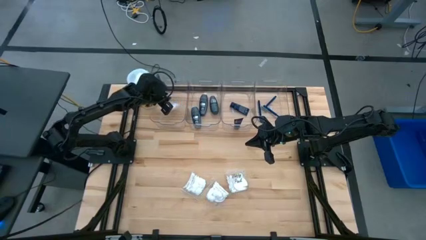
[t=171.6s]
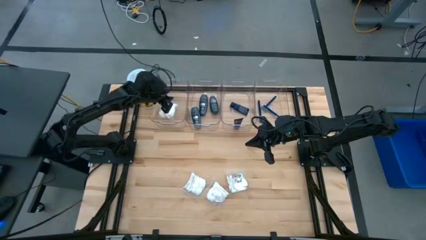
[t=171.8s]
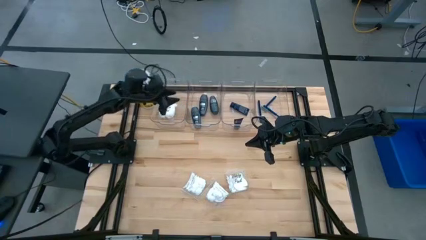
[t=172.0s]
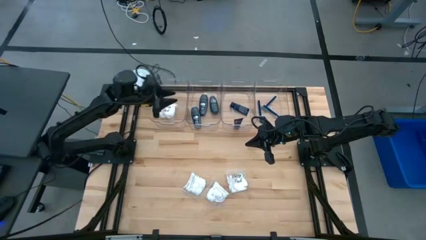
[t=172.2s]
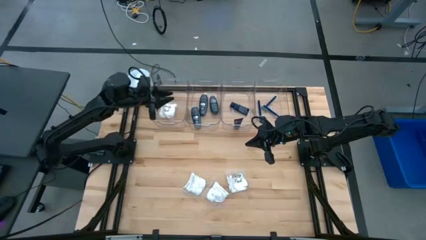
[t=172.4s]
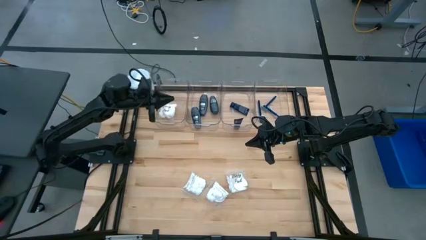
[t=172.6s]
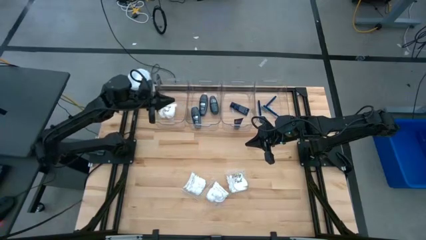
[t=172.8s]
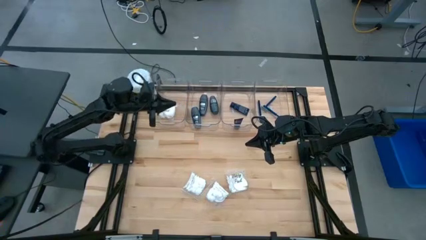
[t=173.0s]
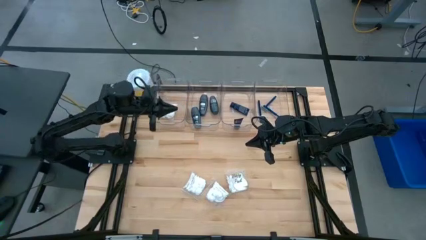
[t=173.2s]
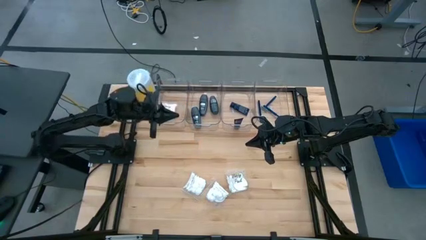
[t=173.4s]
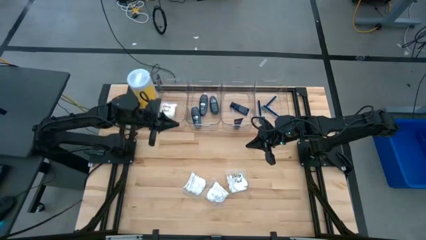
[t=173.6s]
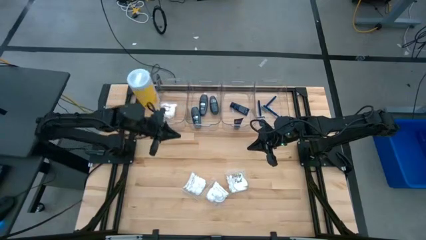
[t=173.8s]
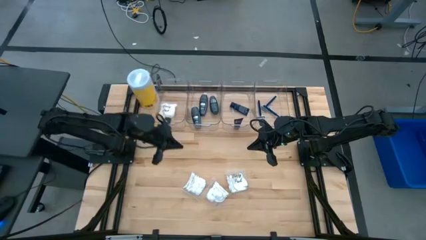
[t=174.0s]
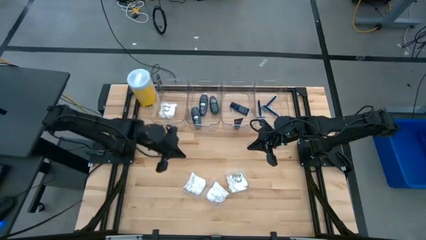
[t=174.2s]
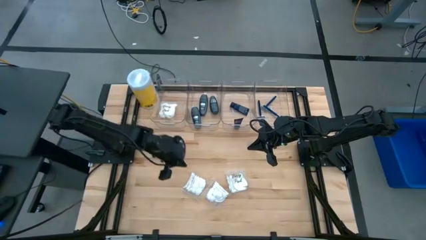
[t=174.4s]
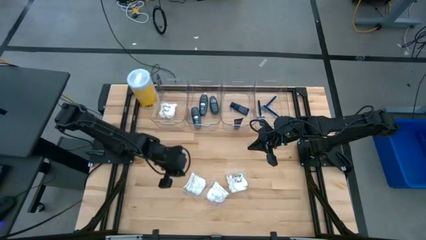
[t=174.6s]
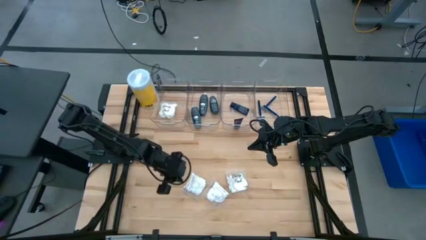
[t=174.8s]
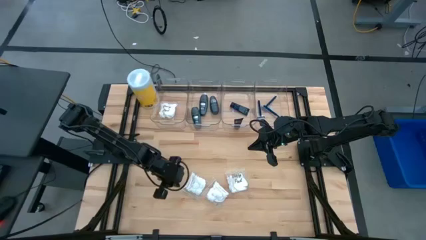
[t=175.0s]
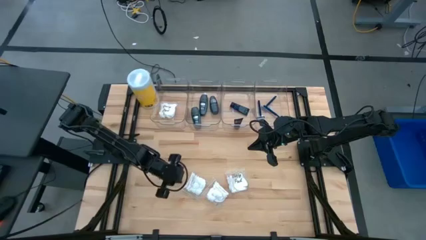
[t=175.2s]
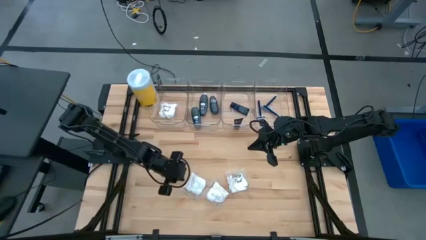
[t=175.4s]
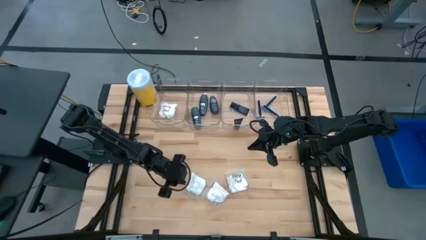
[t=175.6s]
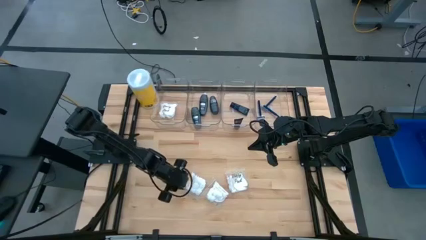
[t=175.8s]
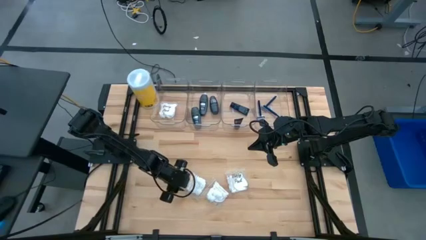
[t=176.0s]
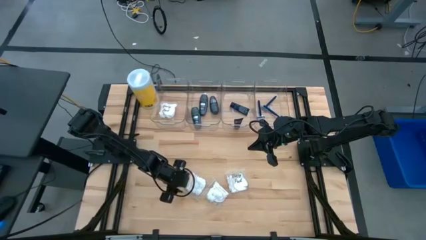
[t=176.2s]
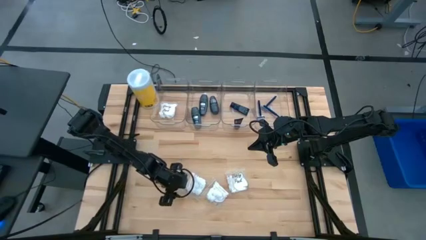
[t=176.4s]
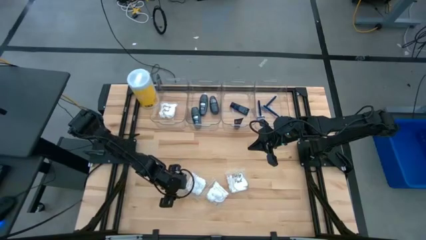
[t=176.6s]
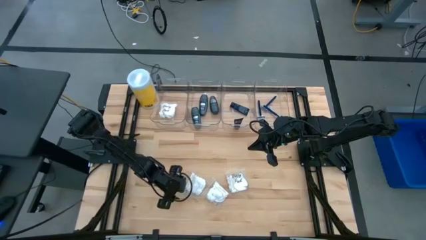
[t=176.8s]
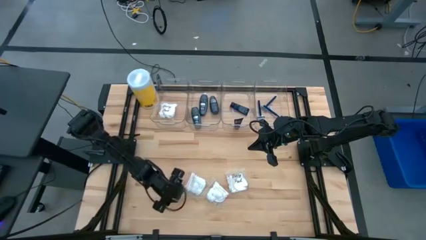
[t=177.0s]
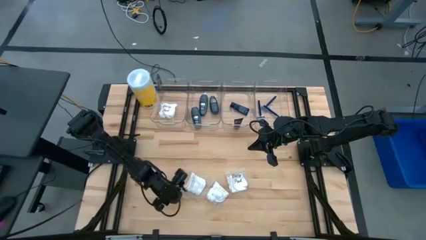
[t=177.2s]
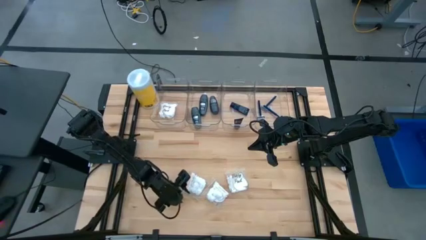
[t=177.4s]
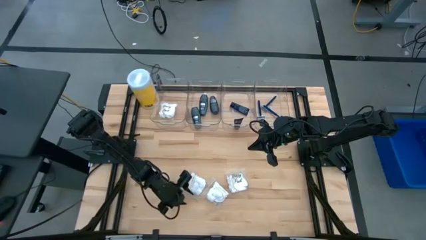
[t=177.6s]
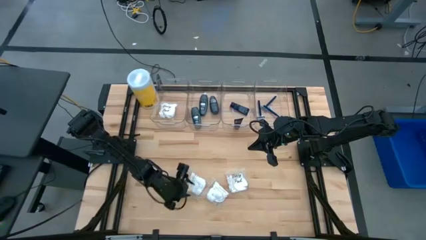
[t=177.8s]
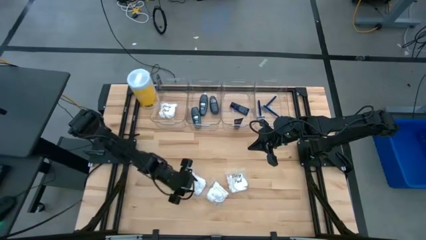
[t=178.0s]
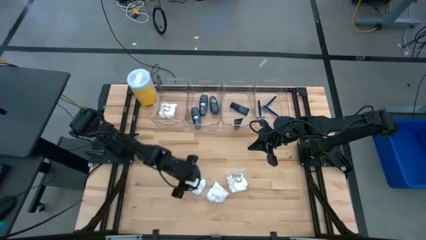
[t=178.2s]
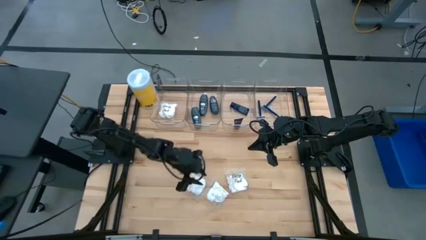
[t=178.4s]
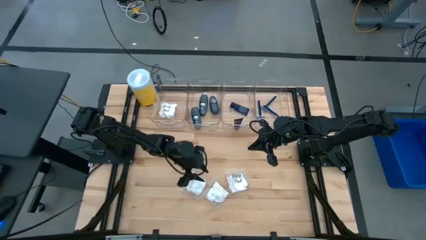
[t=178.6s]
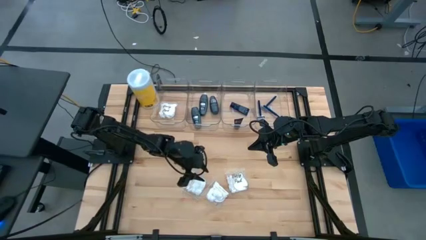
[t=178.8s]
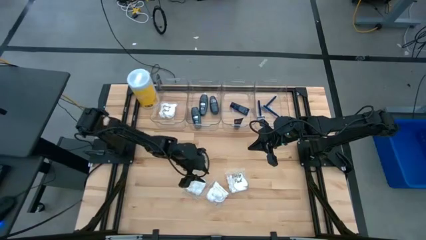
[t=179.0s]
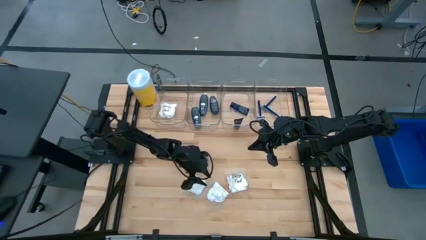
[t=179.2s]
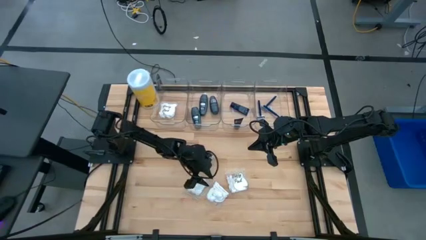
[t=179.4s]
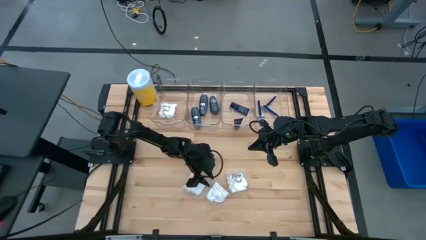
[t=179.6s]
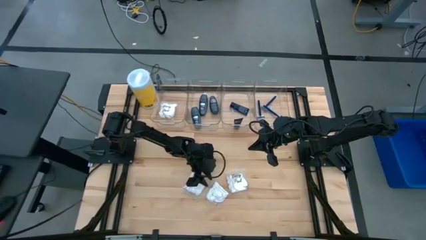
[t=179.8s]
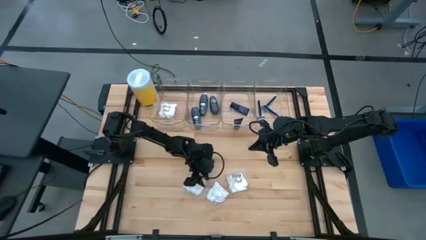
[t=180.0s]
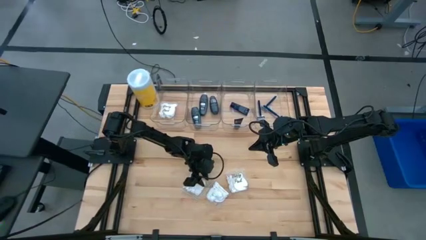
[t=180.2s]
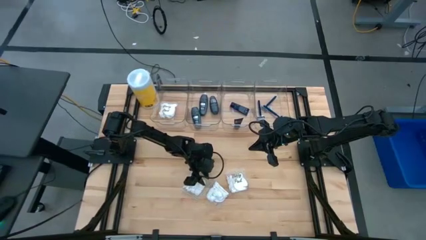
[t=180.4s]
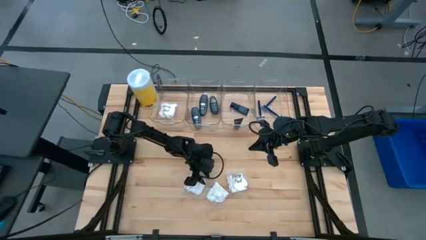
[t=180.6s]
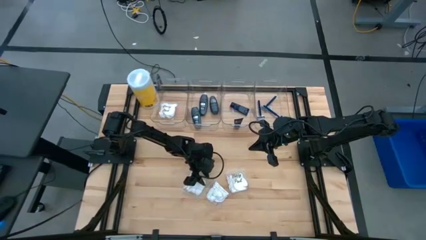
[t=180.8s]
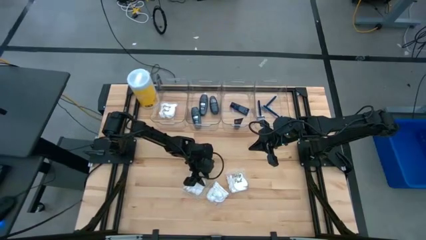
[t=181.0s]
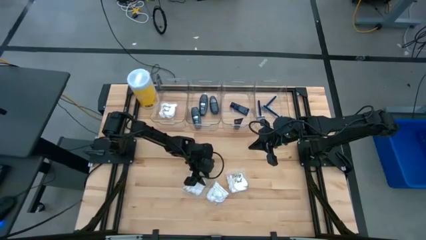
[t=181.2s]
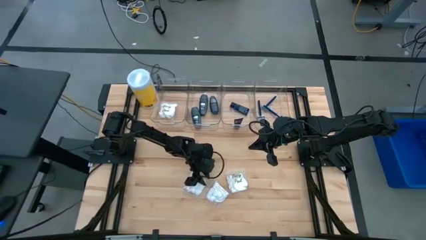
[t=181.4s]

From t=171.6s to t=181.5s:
Task: Pick & Place Travel size toiletries
Put the white cotton pack into the left transparent bin

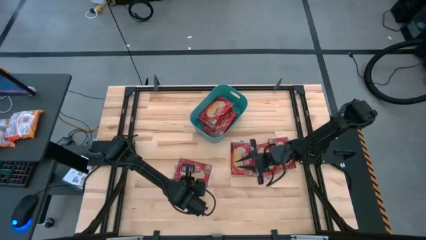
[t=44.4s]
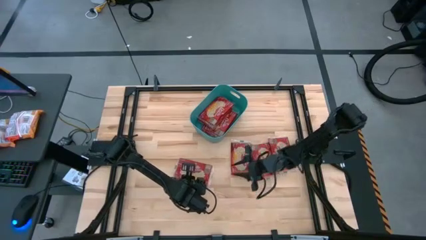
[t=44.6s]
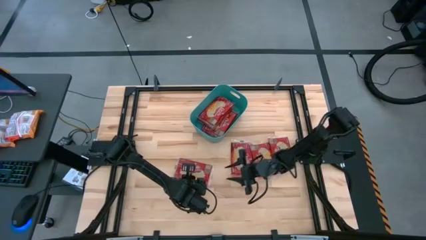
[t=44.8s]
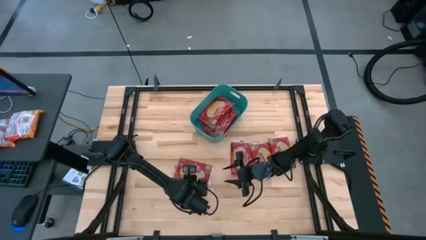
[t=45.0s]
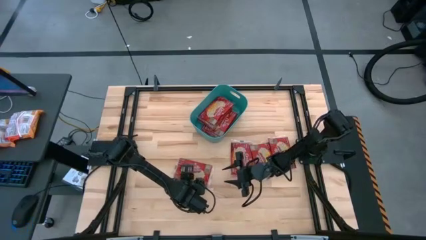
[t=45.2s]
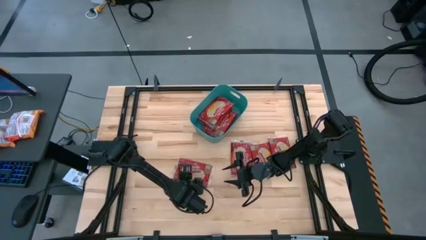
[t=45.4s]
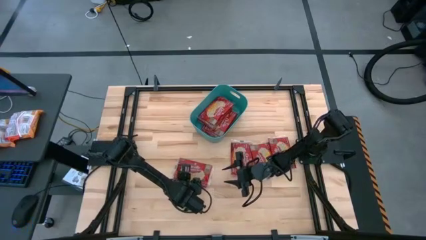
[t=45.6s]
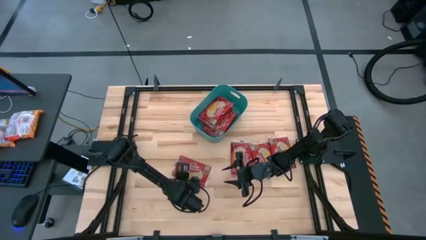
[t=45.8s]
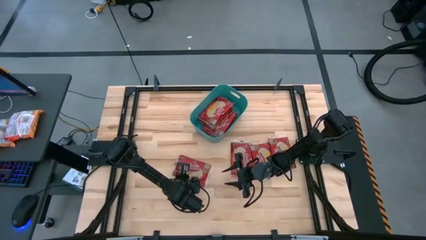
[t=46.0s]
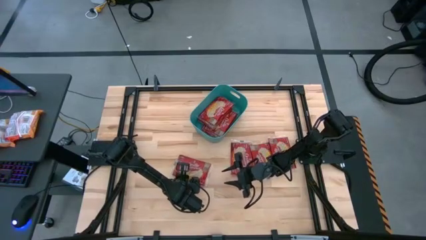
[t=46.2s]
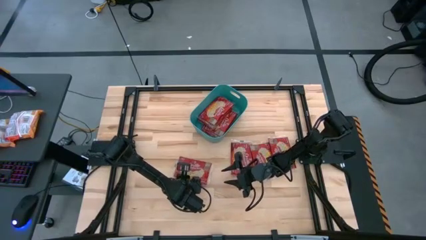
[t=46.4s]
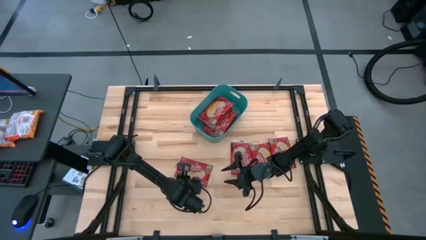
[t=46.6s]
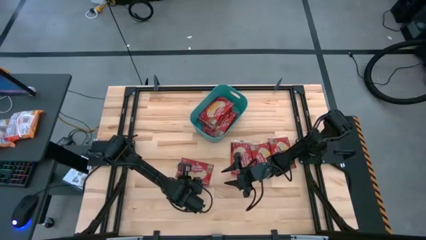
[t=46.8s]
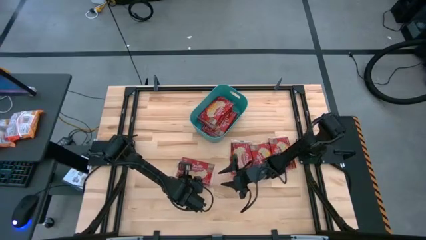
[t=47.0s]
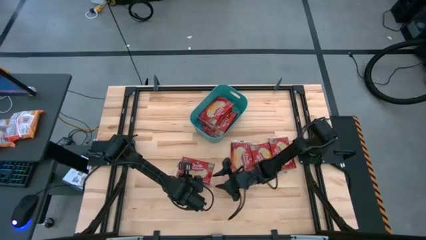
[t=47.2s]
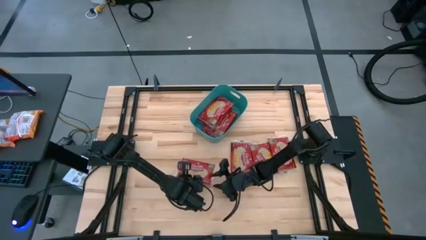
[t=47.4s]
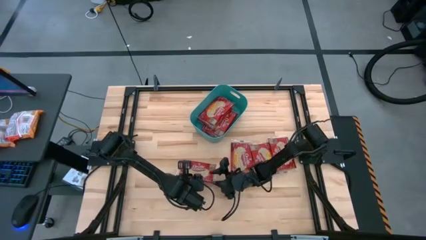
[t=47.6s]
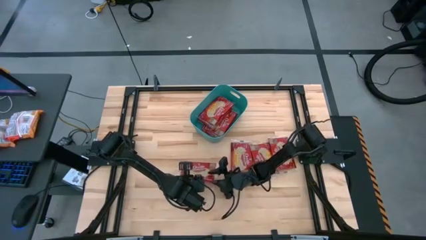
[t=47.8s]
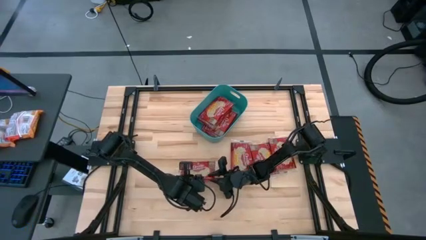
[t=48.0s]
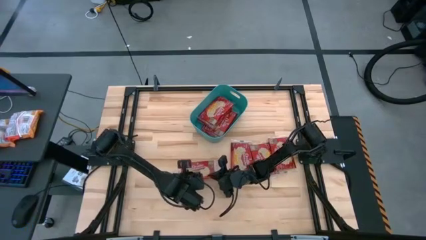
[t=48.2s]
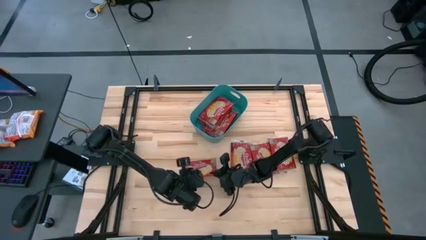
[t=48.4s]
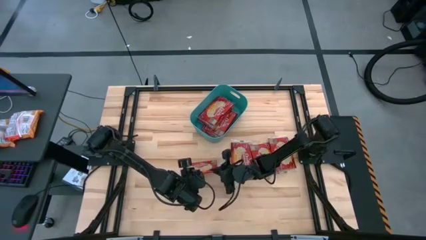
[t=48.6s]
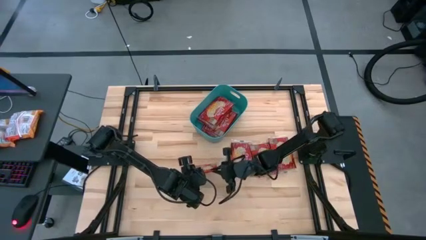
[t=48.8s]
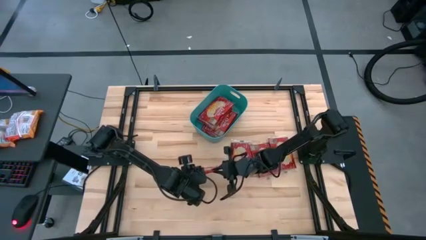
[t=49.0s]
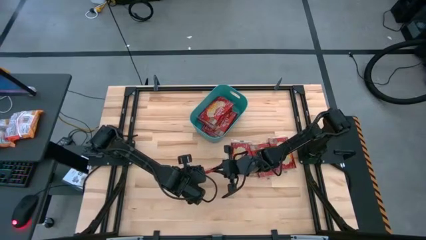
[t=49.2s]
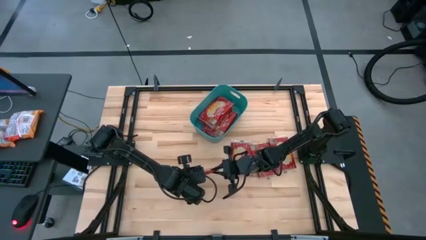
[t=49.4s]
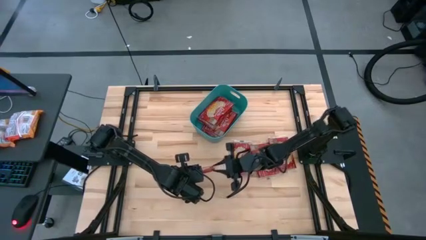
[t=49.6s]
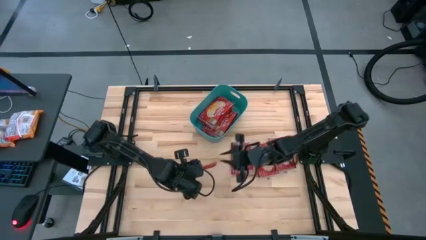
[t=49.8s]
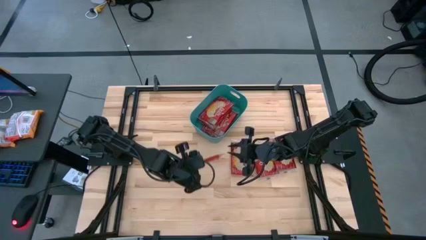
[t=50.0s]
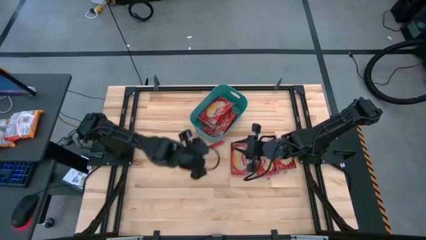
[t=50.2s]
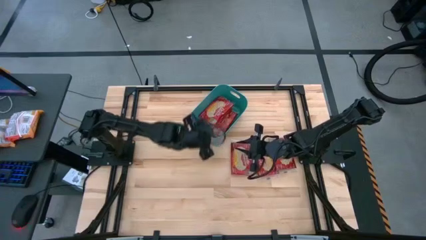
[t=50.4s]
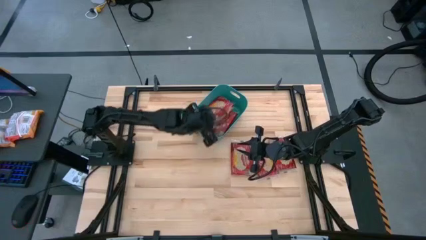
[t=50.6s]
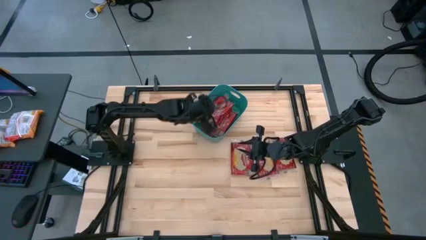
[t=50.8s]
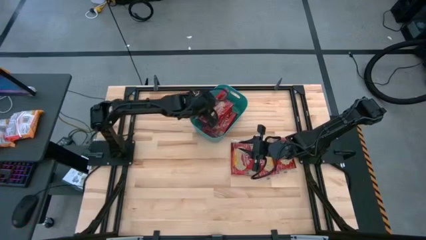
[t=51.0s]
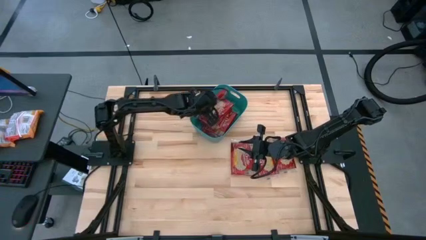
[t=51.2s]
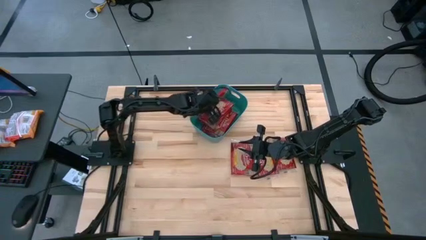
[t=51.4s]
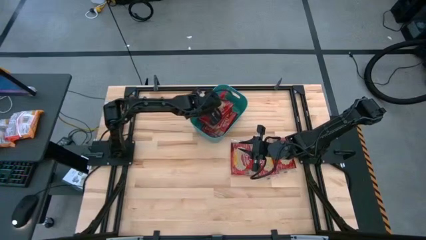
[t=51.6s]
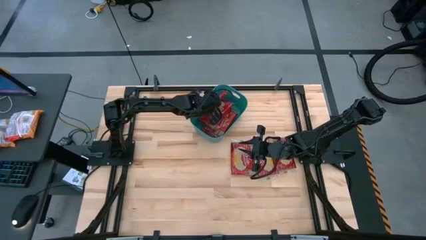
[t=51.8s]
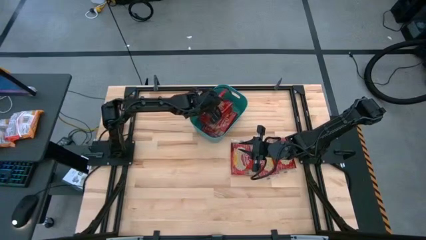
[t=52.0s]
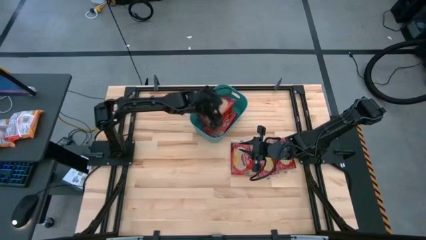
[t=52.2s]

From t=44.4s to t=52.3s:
Task: Sort popcorn bags into baskets
Put the popcorn pack into the blue bin
